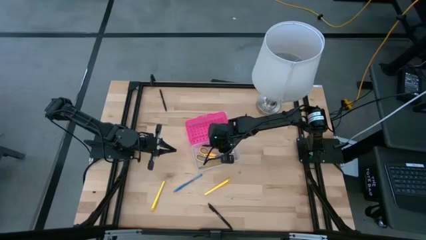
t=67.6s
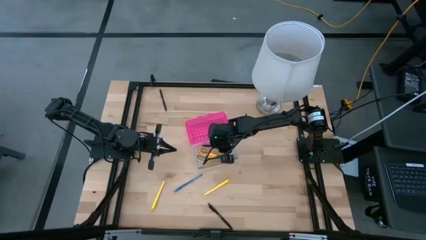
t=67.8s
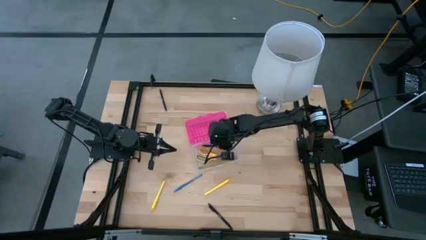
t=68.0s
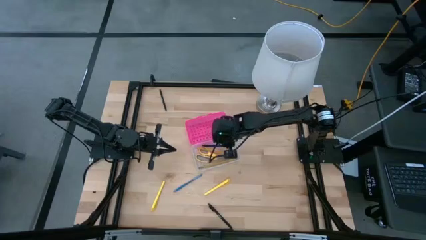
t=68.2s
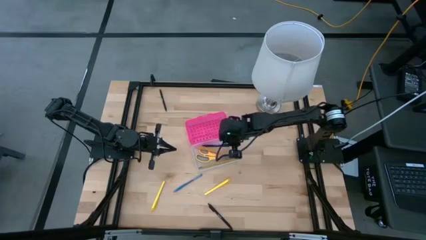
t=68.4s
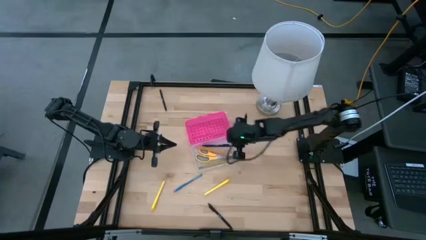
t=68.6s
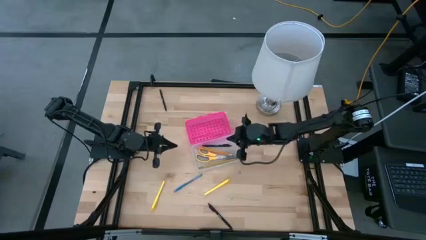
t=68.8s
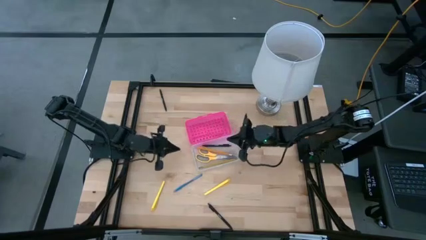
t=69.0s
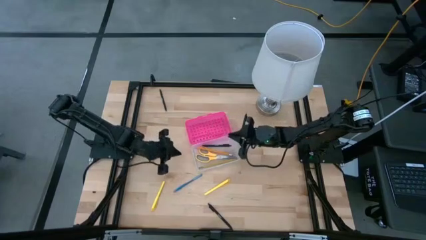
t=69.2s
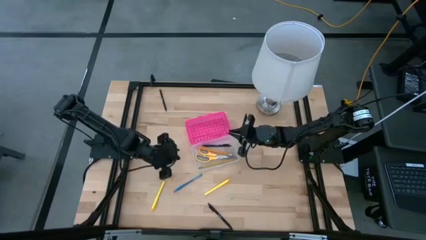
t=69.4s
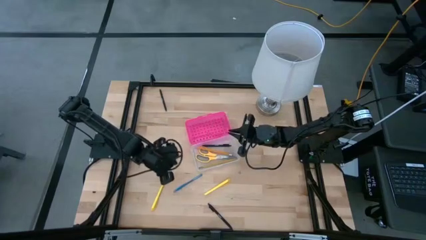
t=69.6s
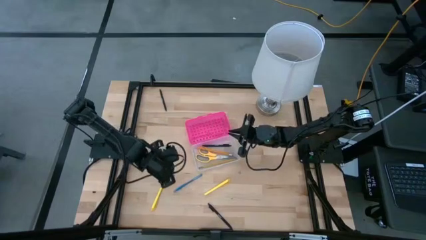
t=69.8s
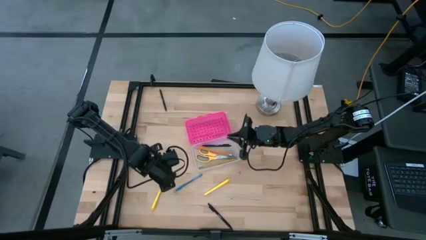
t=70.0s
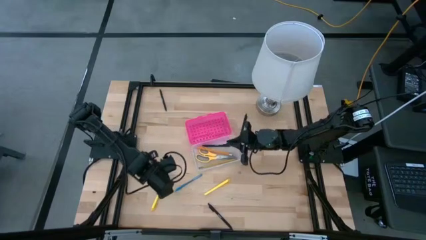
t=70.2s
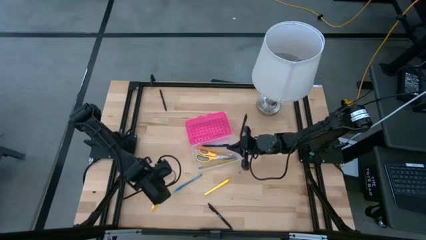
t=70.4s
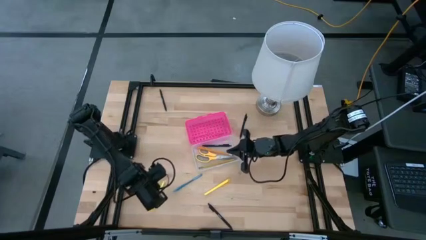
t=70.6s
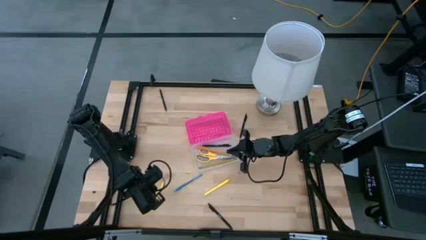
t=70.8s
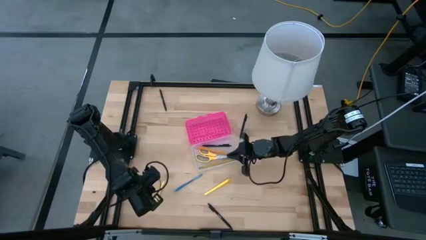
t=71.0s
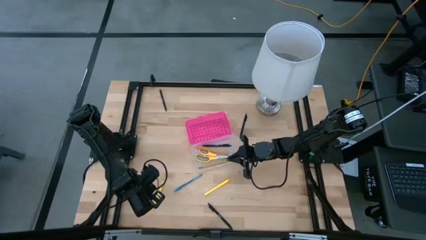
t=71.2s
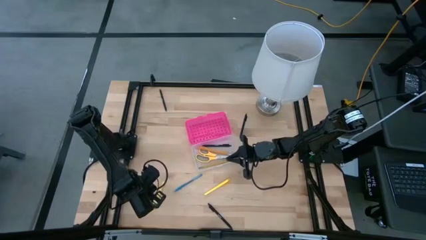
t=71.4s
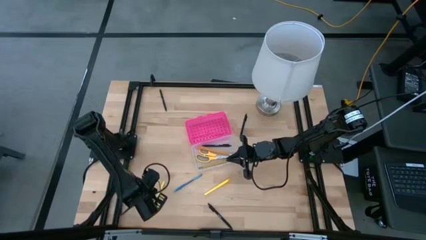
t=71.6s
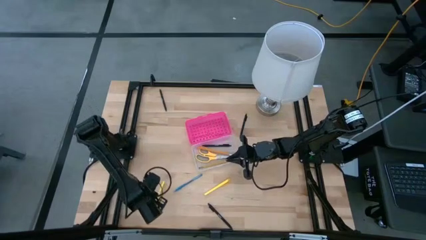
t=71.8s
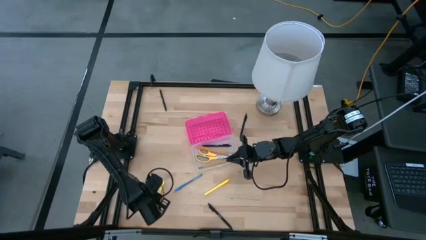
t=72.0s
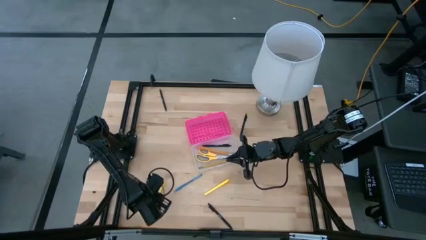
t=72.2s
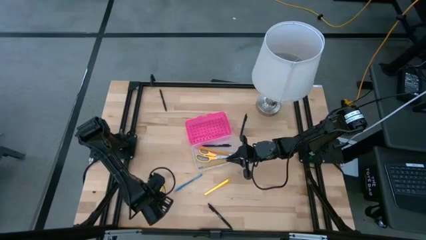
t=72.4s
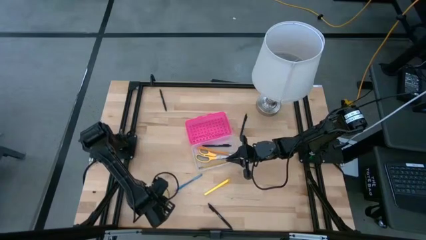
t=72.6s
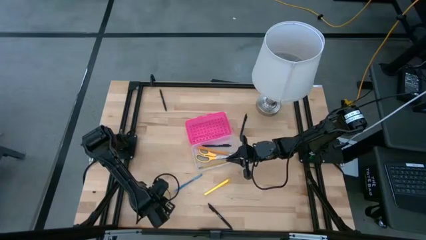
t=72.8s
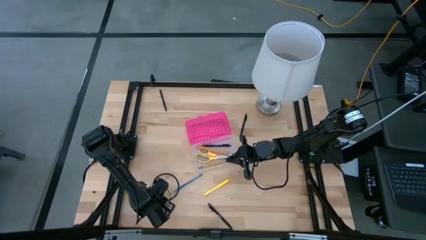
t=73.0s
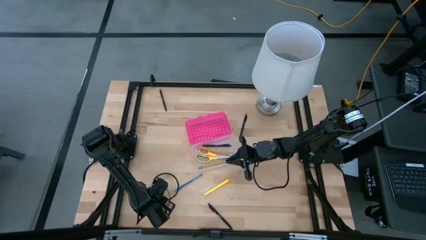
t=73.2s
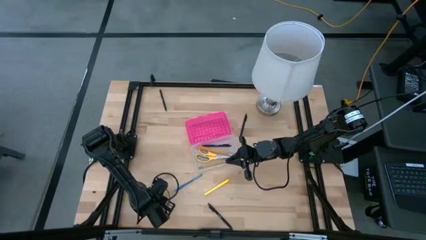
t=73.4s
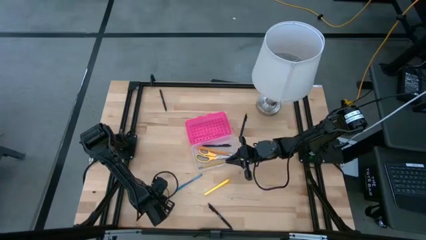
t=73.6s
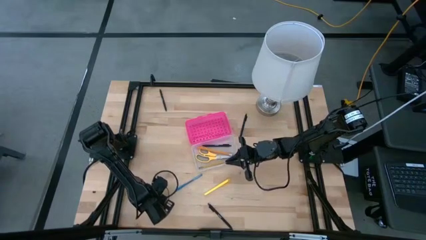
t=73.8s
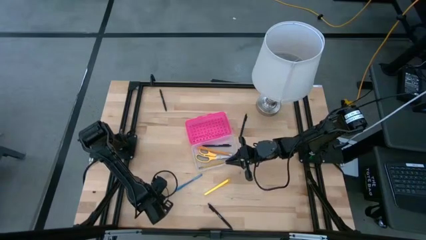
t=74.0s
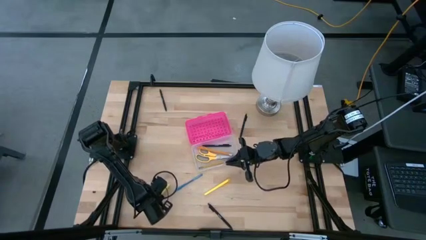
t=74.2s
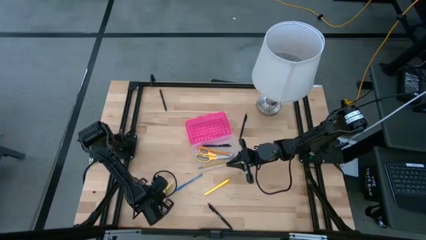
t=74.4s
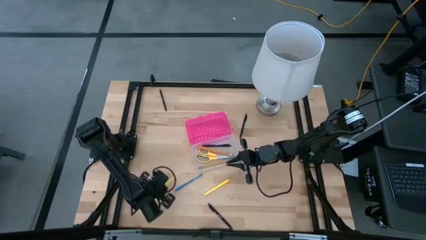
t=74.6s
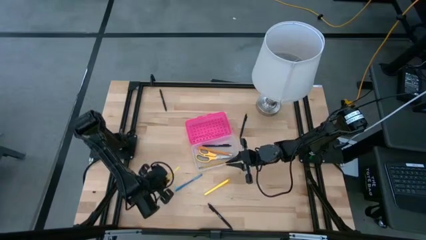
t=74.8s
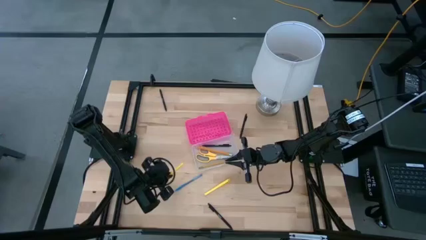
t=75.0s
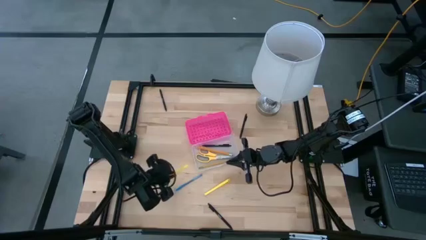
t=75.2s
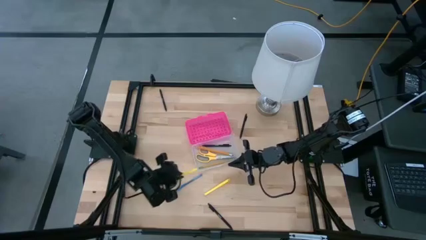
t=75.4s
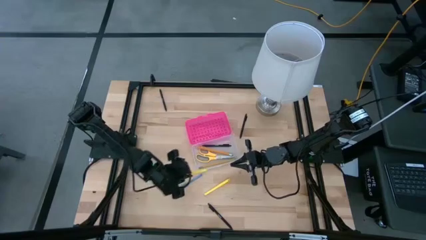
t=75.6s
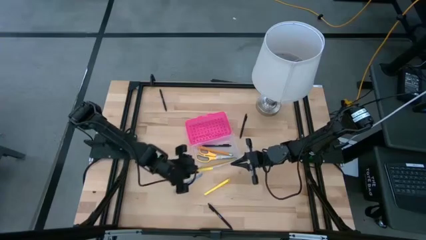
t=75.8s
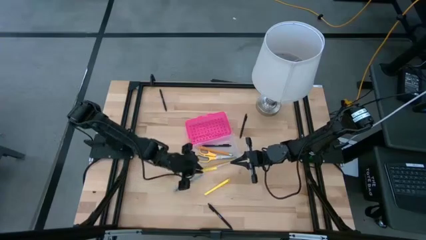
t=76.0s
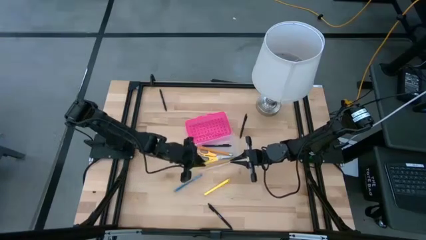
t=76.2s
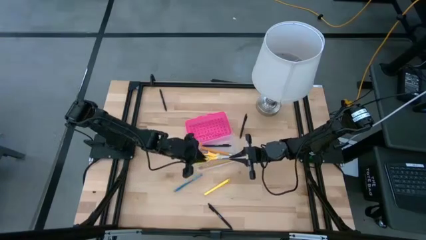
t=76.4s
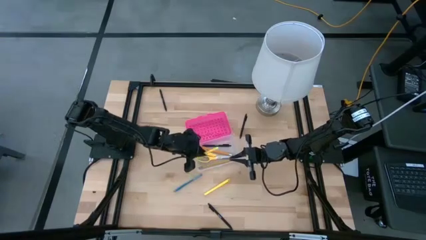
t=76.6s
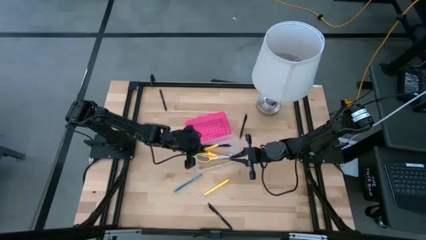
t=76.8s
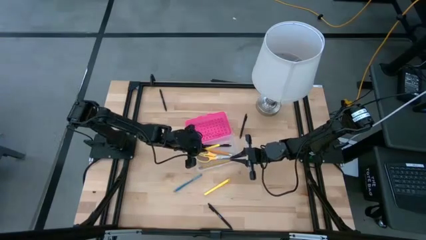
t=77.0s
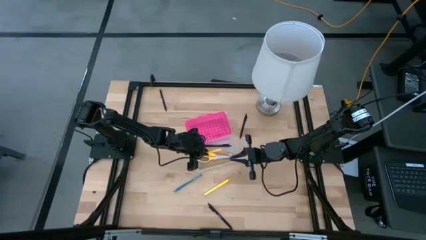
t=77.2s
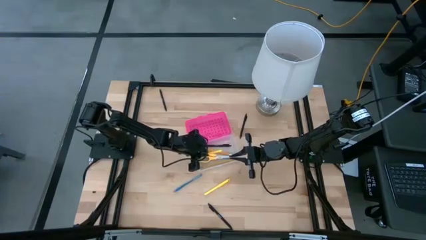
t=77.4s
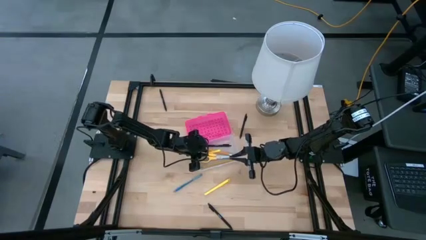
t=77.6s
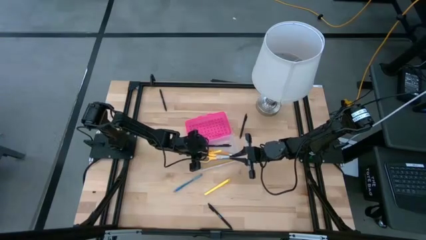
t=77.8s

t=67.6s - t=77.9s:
Task: Pick & place school supplies into a supply box
Put the left yellow pen into the pink supply box

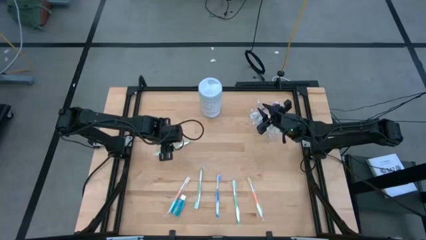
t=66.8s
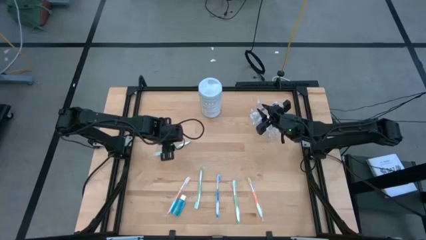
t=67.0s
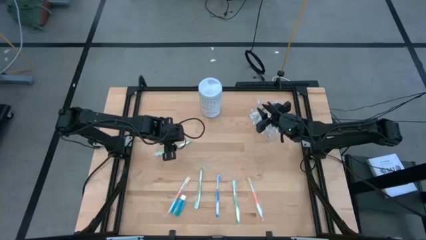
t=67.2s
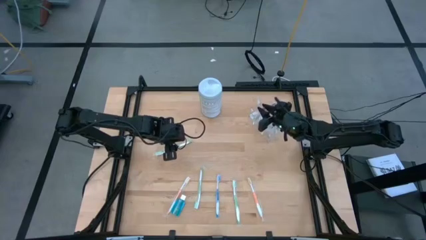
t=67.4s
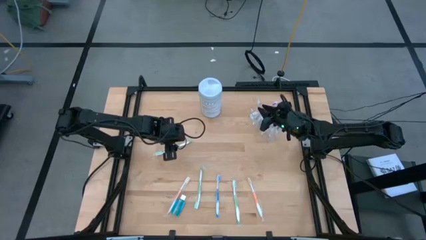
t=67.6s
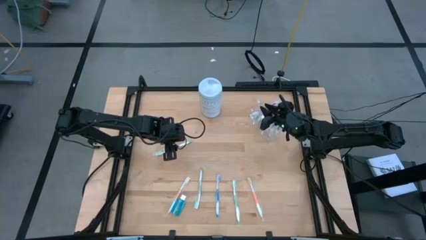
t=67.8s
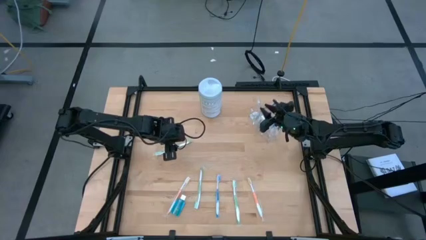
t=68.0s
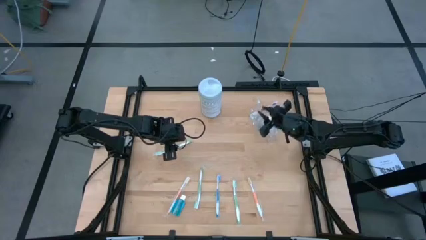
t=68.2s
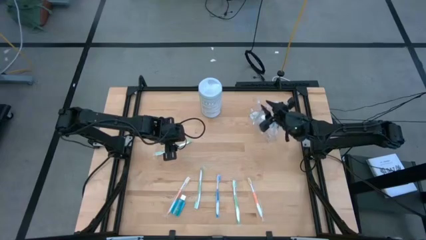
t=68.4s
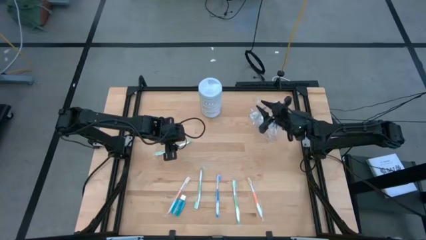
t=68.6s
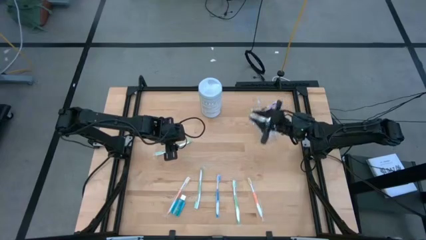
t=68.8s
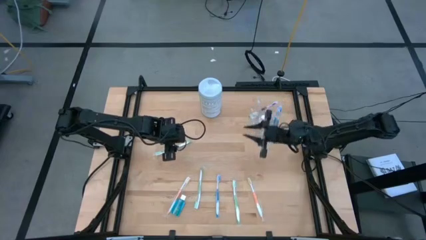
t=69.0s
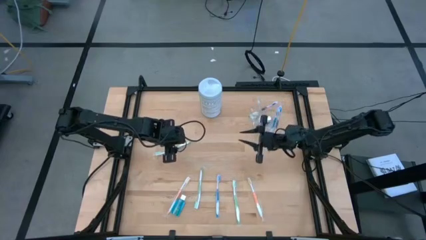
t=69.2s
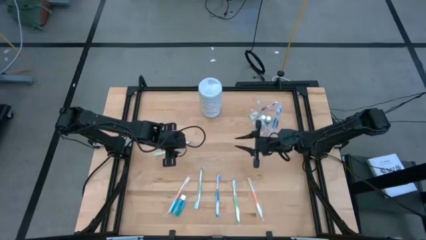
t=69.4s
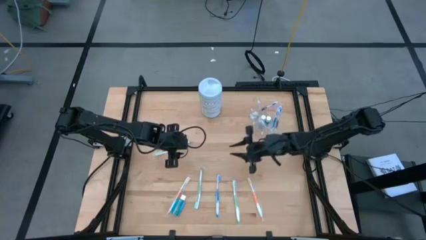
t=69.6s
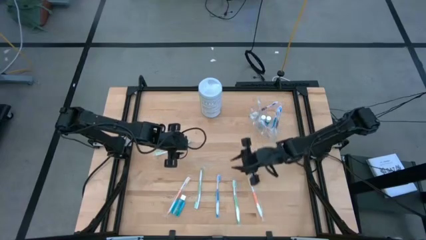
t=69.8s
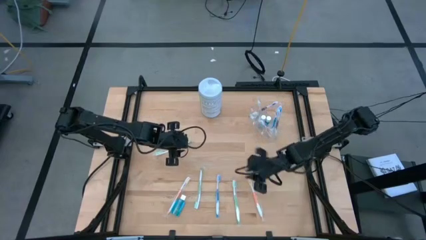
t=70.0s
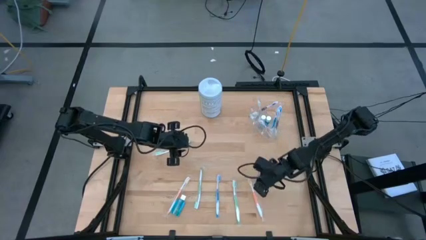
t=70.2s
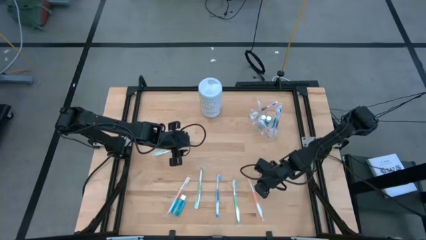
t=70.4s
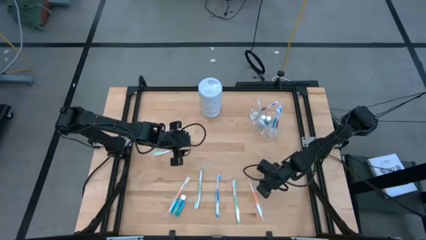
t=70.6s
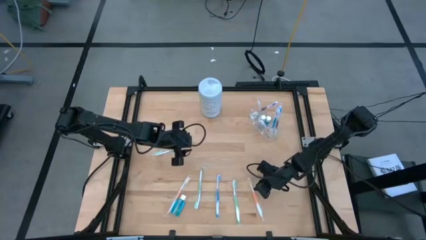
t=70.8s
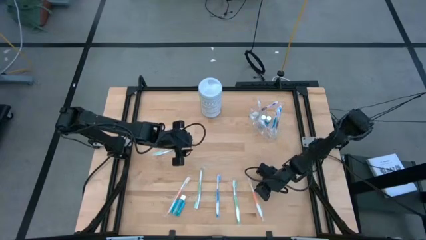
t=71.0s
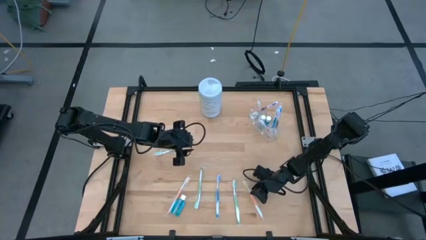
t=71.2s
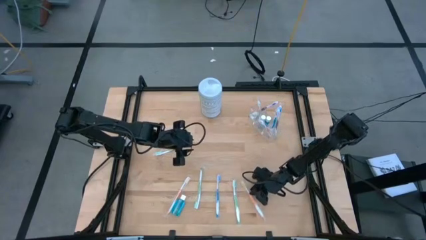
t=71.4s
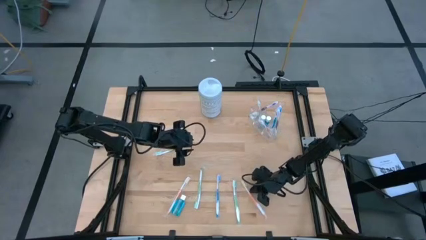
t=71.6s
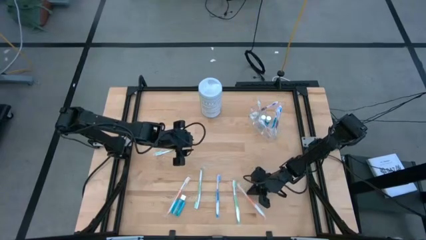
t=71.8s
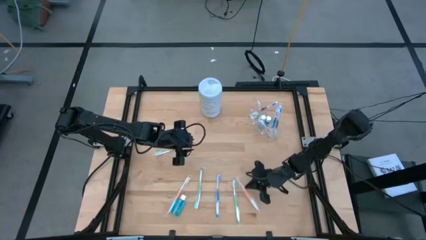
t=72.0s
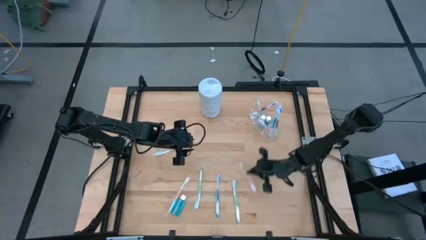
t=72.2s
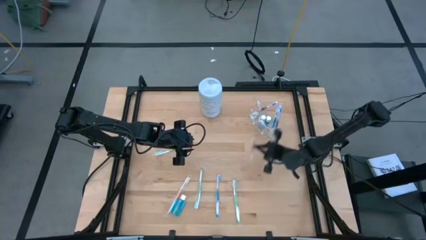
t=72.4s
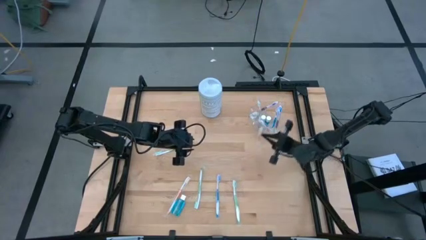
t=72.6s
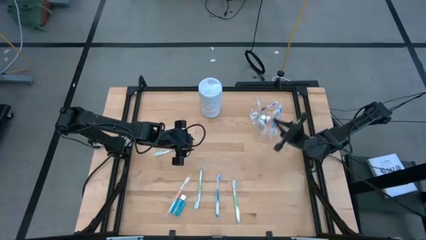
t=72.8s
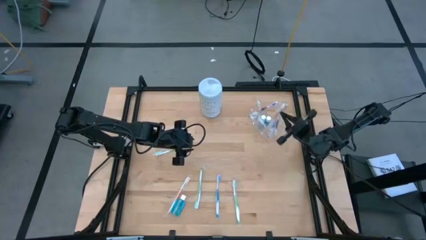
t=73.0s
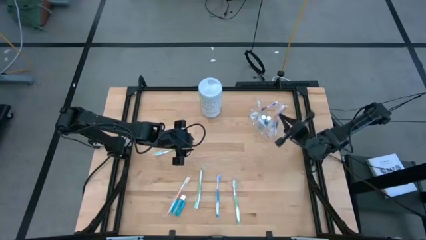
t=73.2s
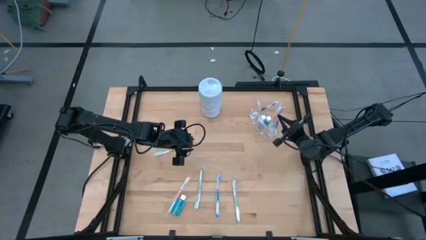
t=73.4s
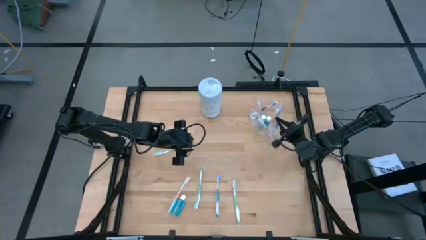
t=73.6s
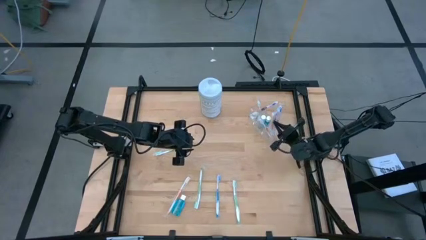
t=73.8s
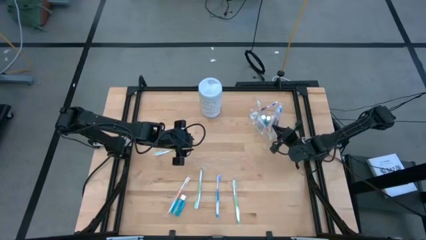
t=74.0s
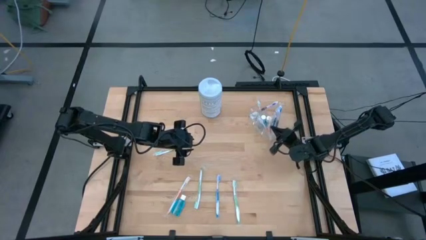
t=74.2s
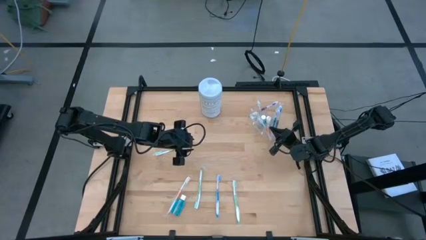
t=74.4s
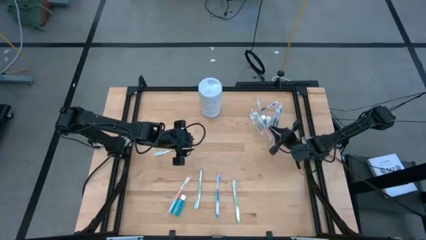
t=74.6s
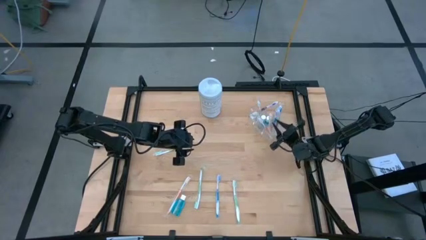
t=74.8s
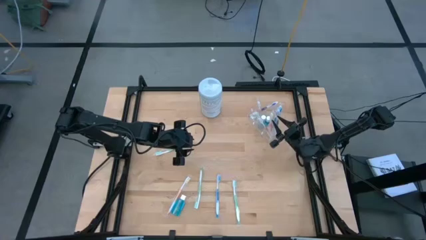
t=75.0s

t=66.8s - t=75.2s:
Task: Pick & Place toothbrushing station
Put the orange toothbrush into the transparent organizer
